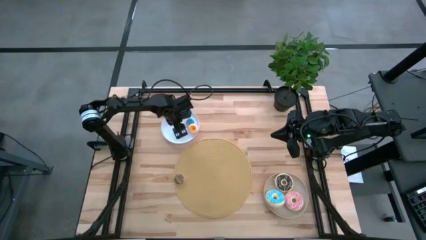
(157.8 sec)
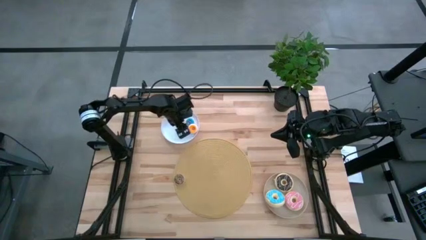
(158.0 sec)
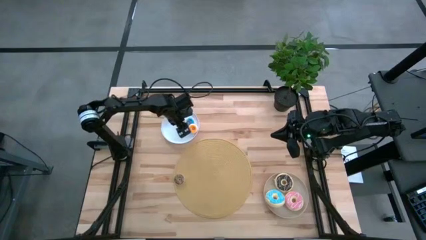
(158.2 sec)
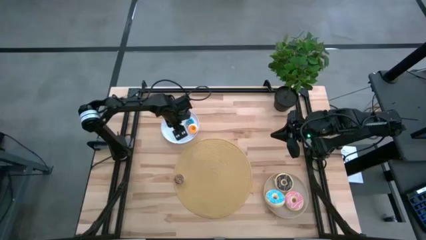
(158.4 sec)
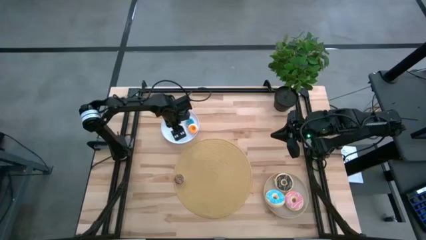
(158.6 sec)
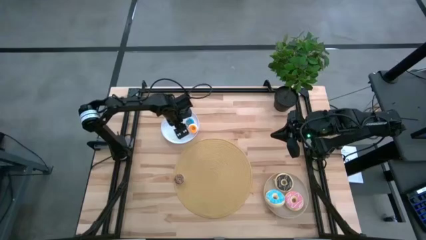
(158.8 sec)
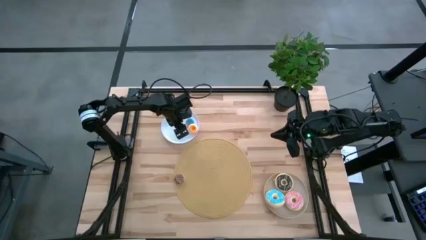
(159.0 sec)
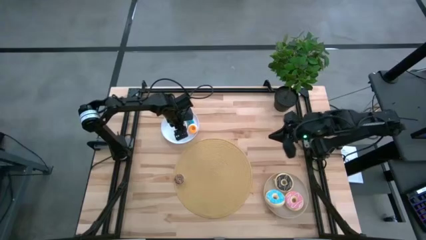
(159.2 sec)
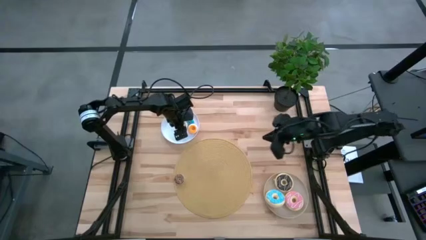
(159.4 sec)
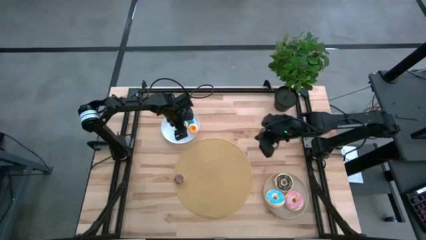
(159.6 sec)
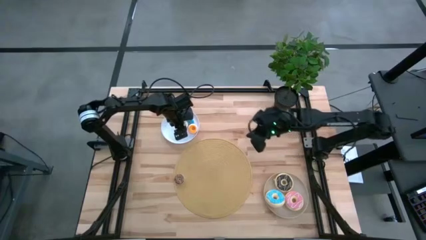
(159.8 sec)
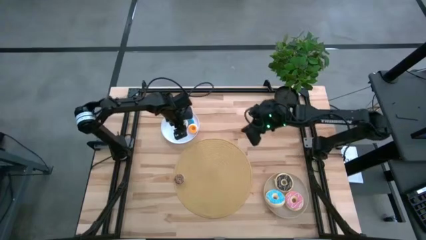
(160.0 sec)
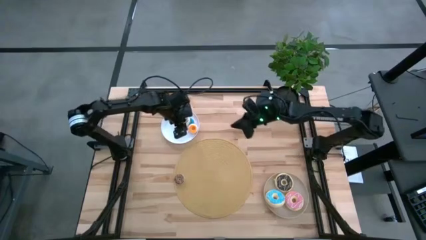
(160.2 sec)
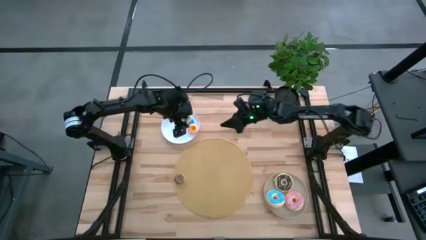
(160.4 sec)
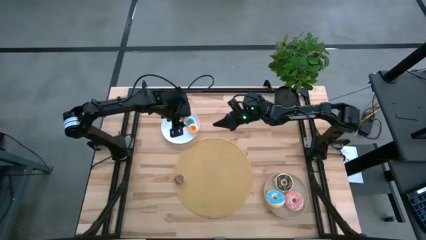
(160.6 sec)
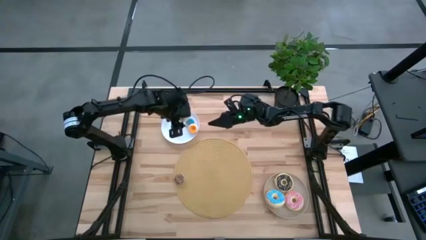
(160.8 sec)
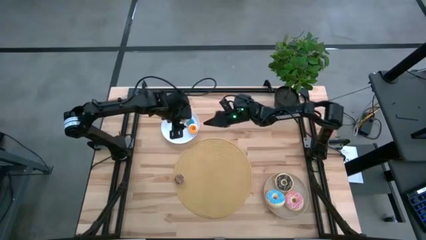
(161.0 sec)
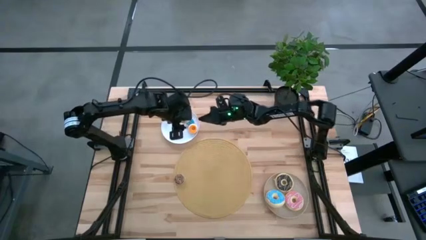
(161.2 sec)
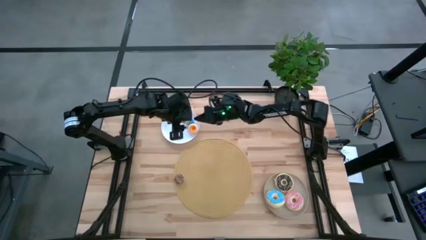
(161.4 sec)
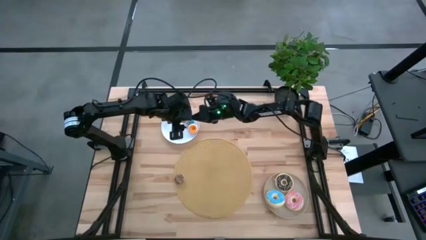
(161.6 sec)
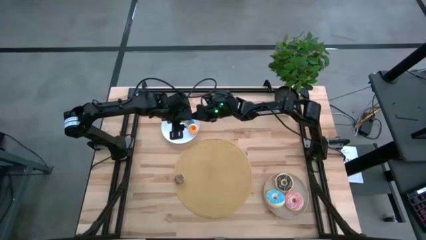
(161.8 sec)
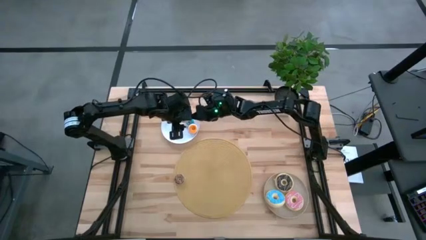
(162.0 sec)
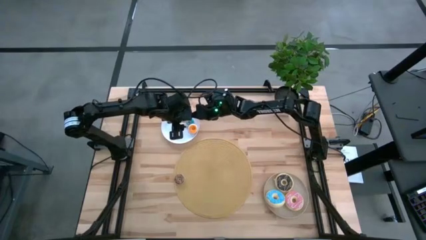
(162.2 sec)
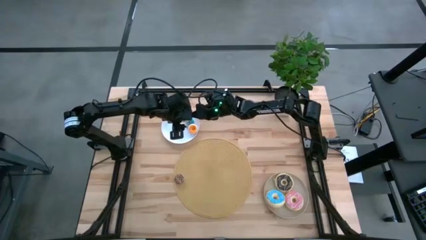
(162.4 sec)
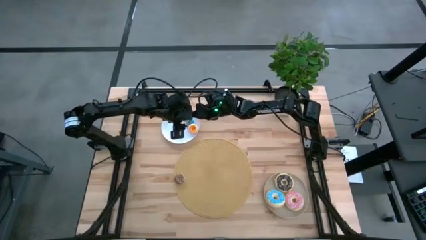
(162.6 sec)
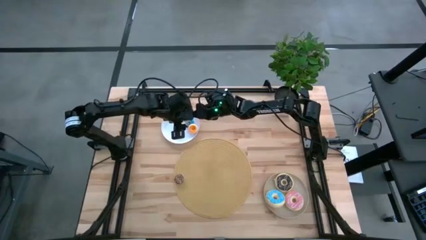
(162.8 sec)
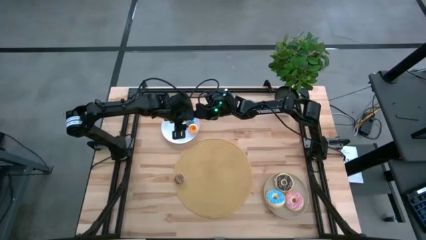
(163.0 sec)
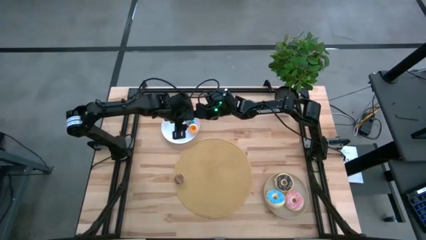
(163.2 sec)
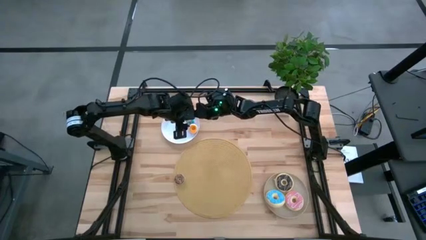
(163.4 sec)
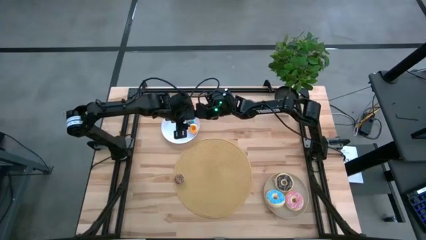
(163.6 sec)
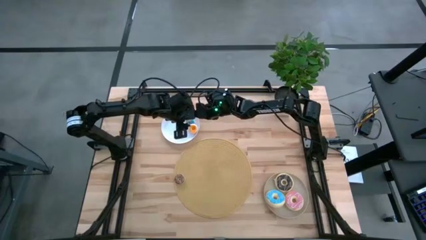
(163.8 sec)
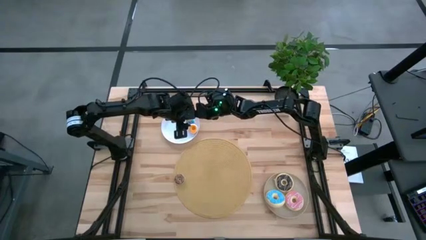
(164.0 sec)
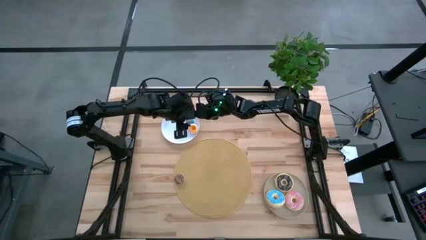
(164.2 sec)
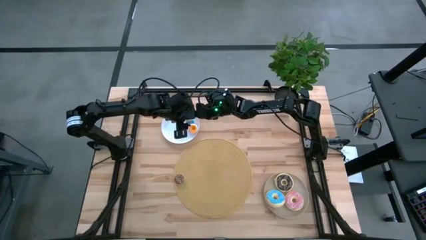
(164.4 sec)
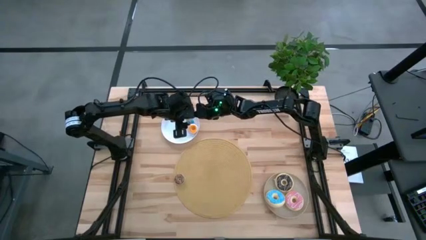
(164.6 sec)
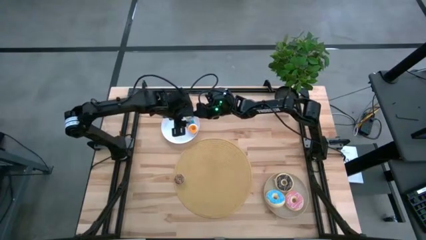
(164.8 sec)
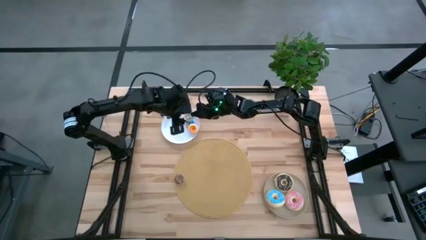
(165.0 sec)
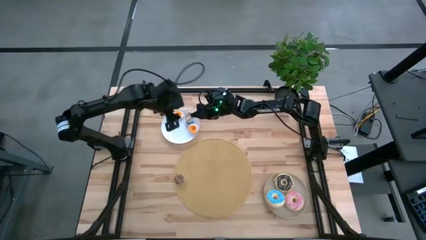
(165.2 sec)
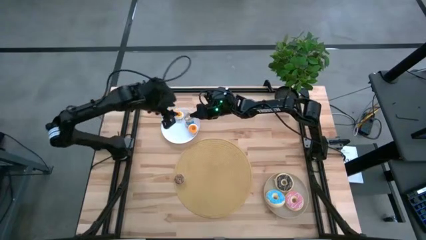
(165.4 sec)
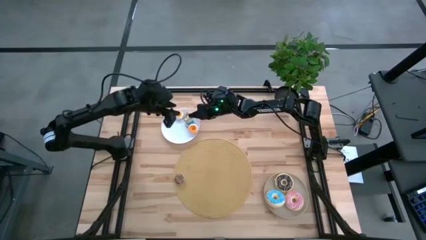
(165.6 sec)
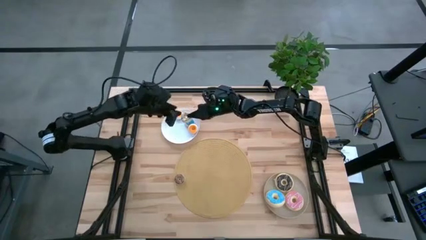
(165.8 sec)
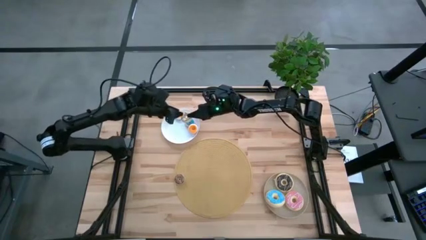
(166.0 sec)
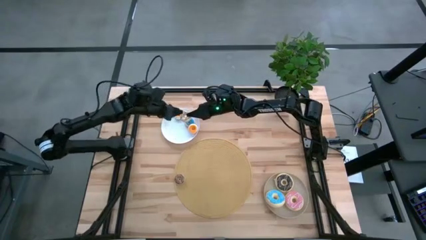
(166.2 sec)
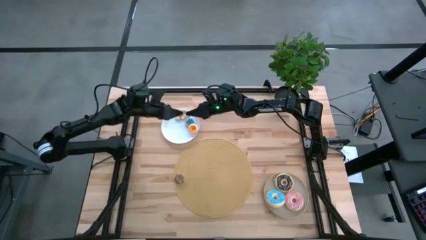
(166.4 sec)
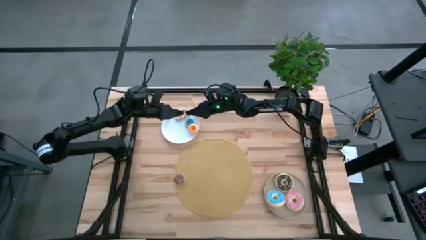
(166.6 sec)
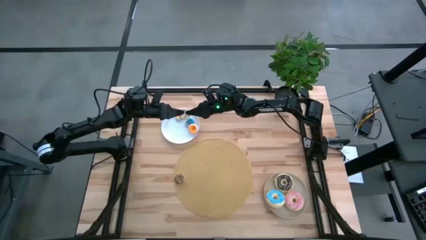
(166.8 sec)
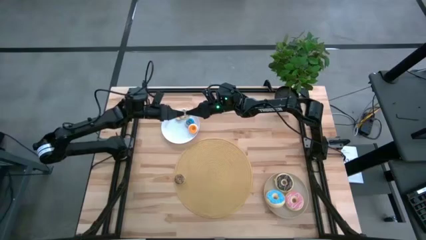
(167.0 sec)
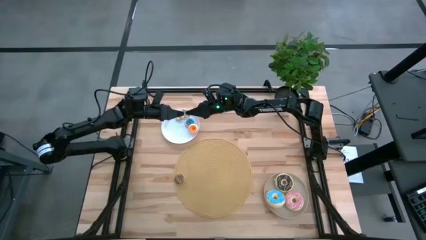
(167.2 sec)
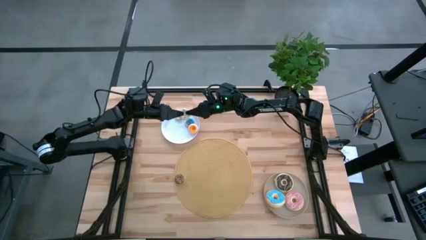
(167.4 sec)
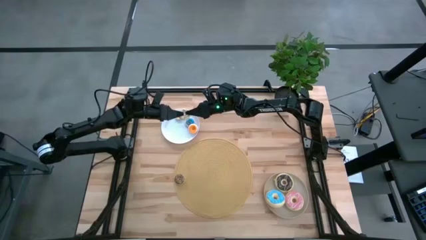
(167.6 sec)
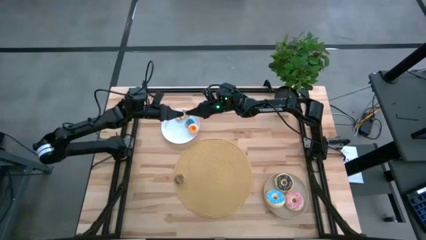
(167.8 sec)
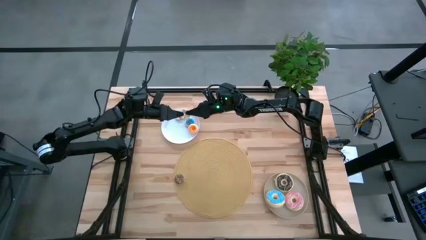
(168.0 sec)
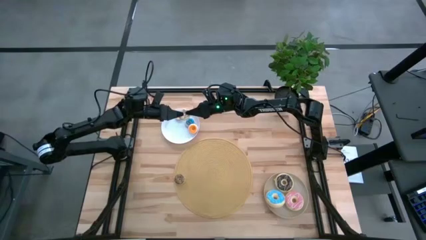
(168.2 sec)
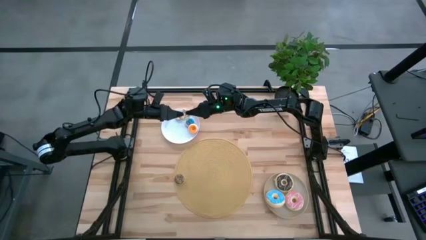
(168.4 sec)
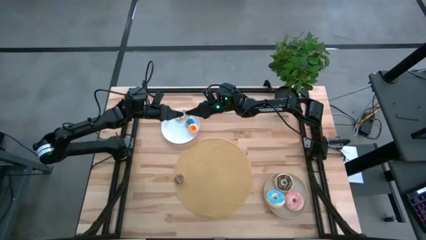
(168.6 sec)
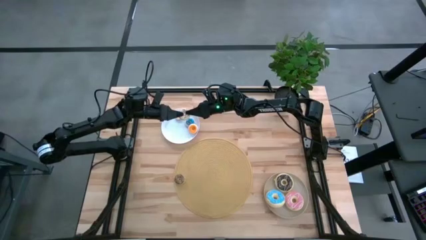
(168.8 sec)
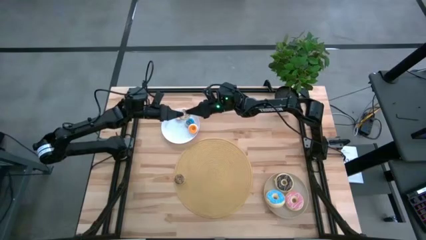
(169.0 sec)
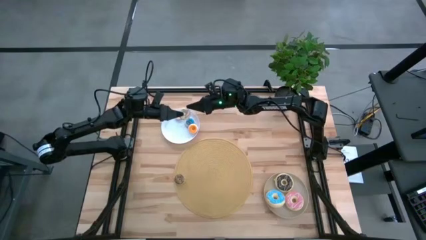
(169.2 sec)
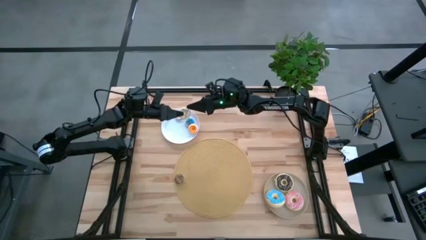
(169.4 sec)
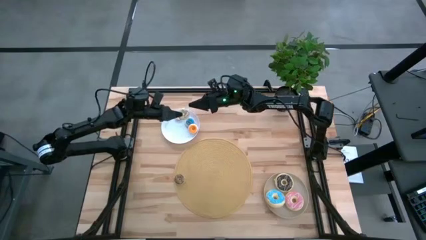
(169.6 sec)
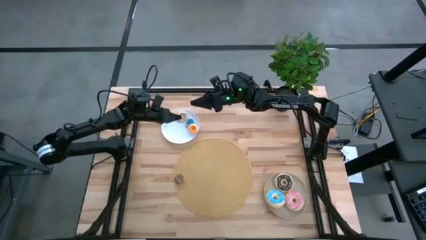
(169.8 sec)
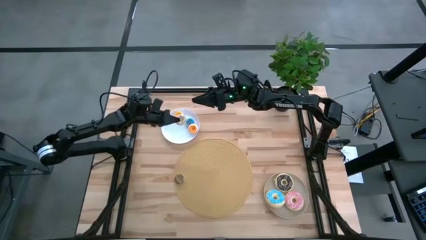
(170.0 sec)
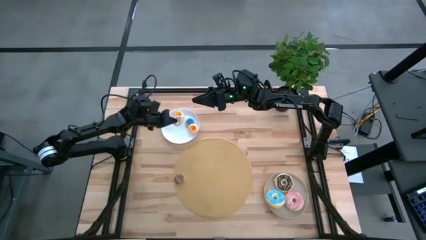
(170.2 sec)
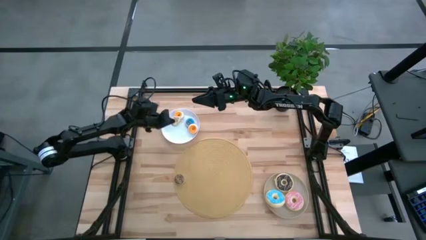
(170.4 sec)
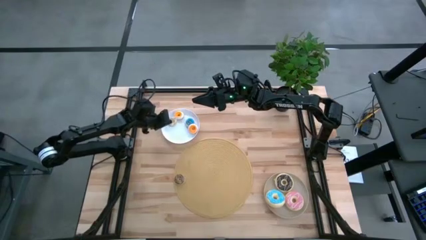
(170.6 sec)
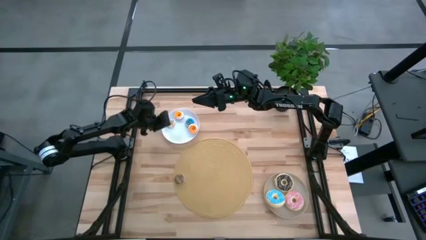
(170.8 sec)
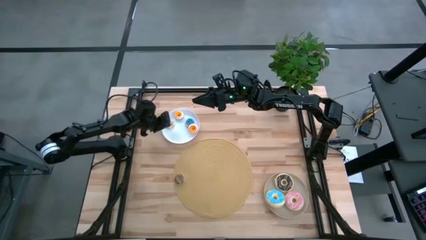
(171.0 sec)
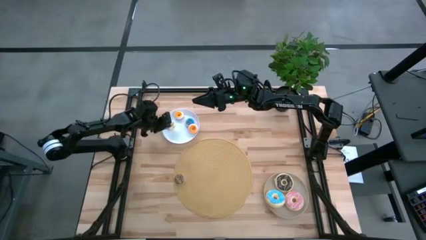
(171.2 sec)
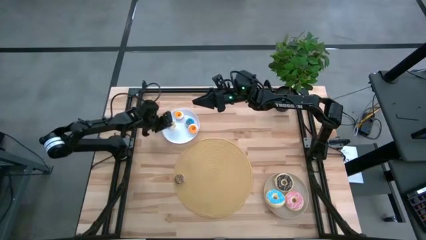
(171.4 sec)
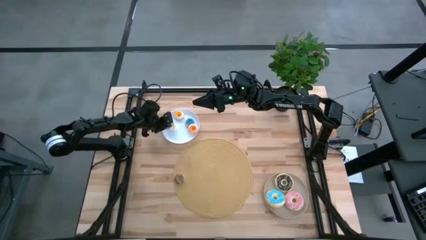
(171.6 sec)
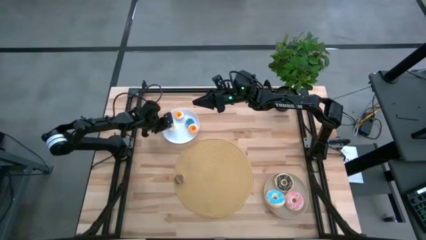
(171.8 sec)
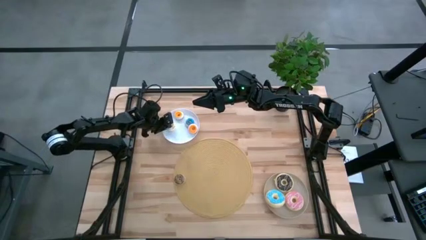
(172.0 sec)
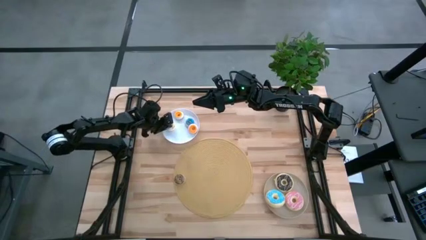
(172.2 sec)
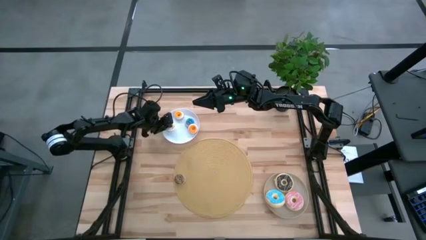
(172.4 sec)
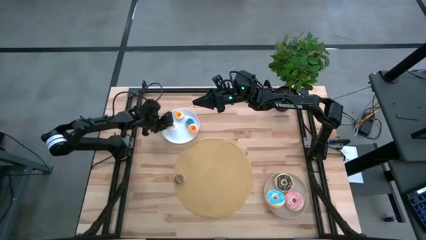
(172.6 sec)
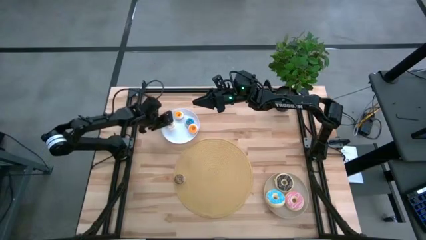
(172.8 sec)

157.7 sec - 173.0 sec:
Task: Pick & Place donuts
Put the small white donut into the white plate
